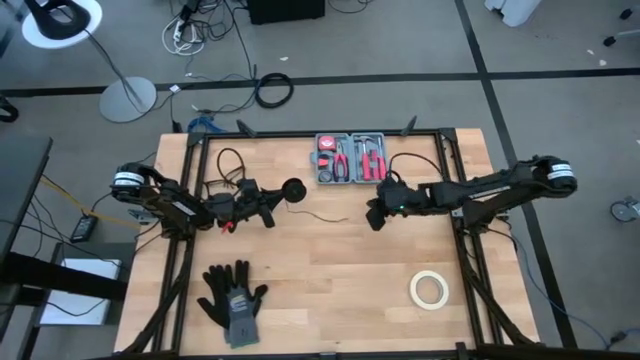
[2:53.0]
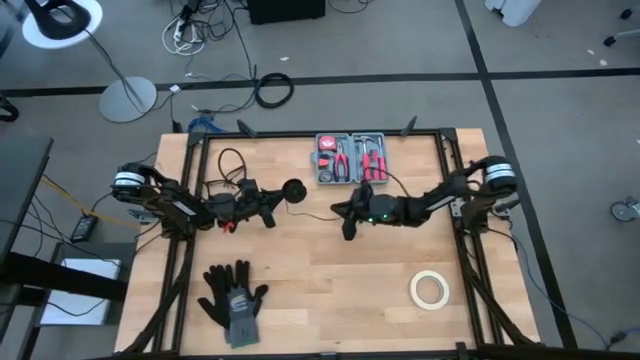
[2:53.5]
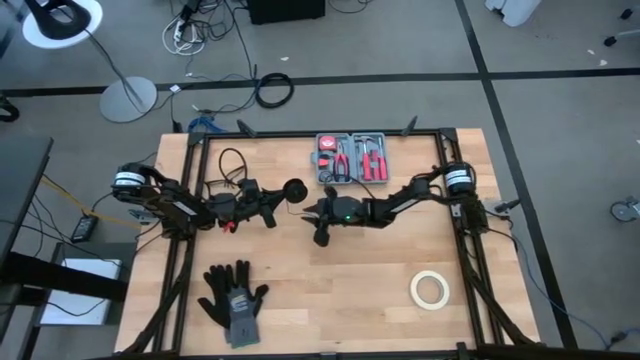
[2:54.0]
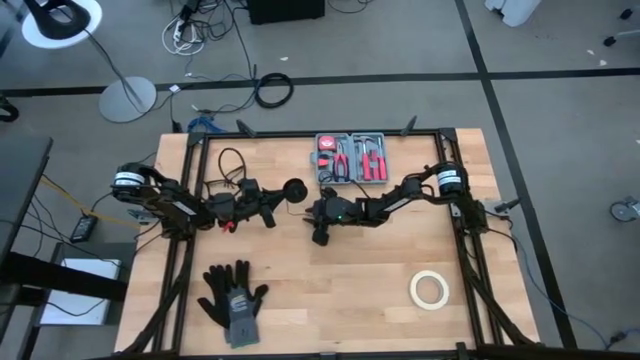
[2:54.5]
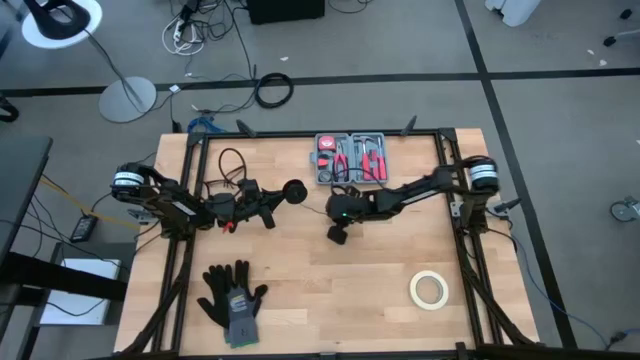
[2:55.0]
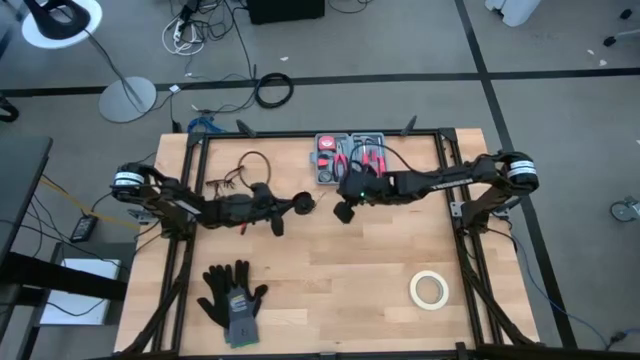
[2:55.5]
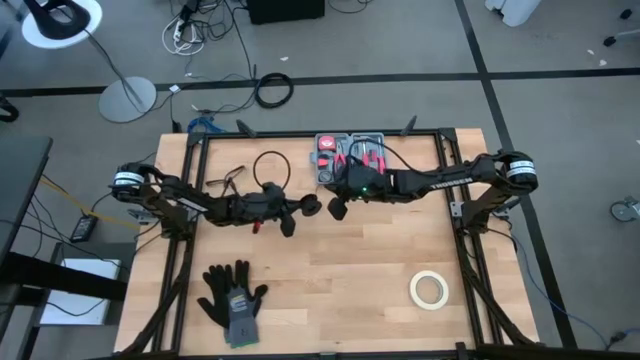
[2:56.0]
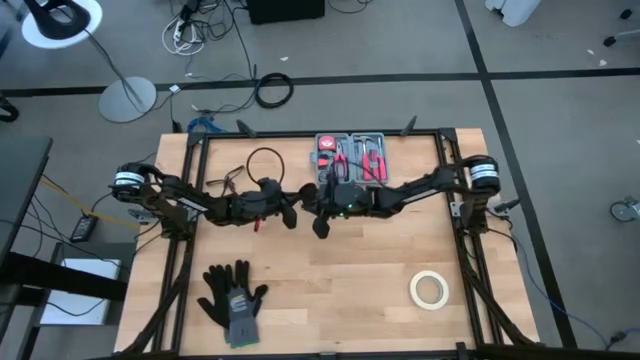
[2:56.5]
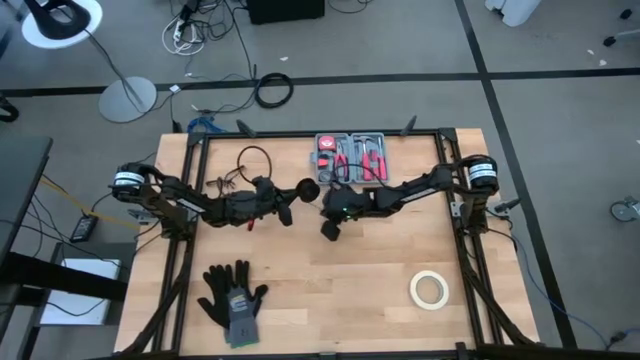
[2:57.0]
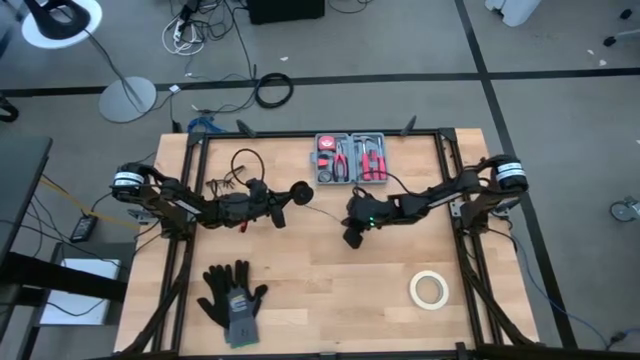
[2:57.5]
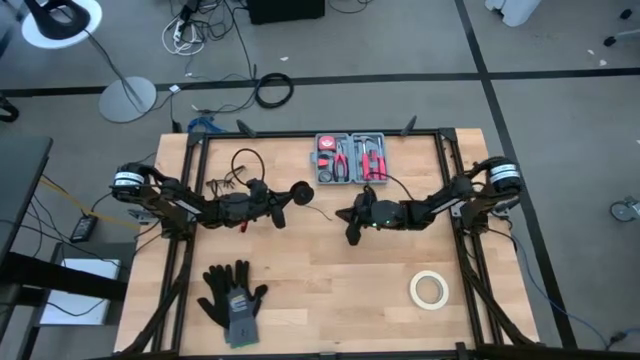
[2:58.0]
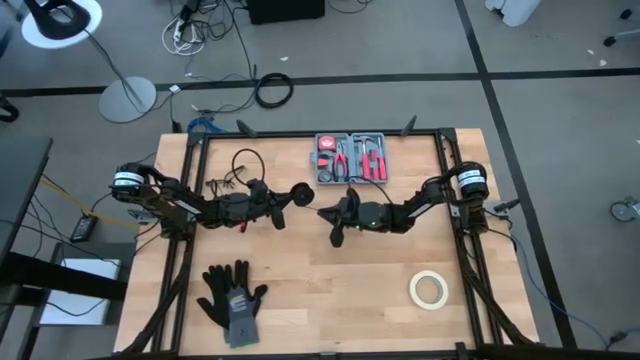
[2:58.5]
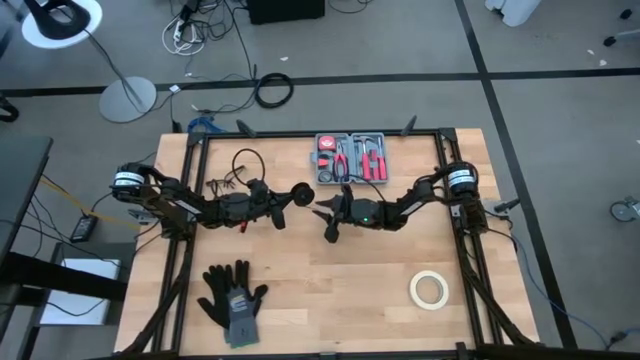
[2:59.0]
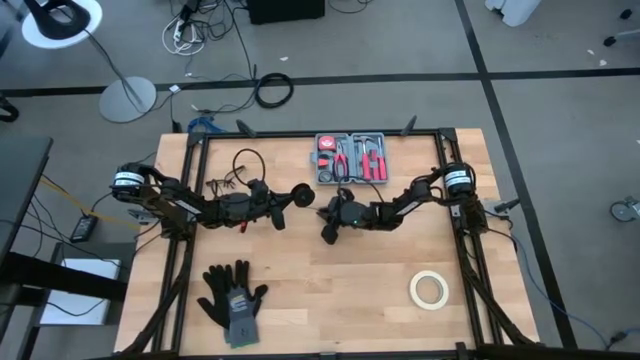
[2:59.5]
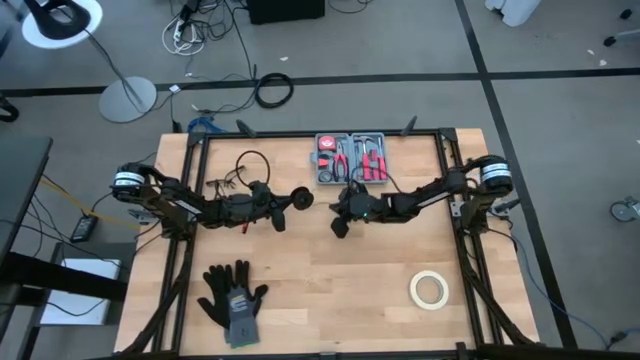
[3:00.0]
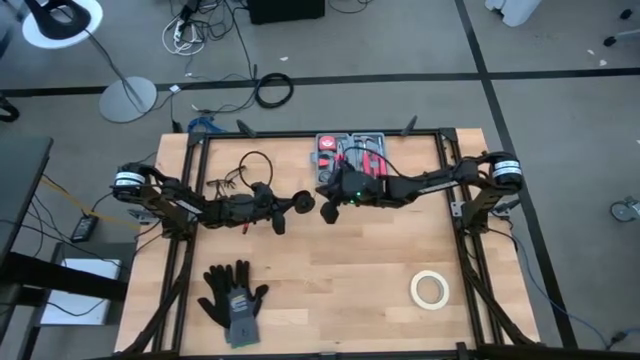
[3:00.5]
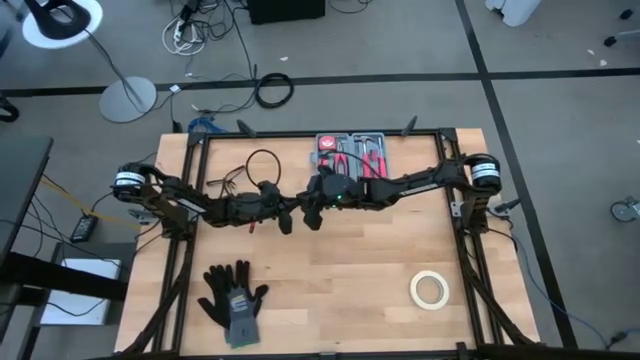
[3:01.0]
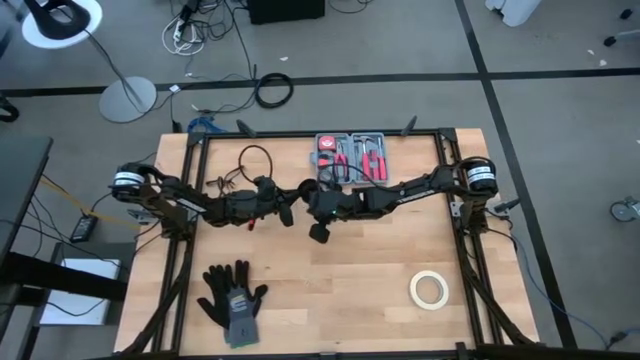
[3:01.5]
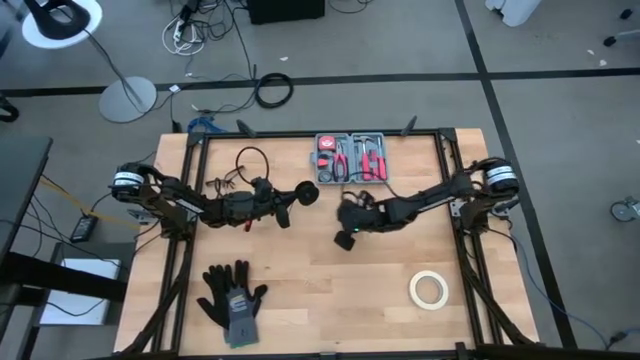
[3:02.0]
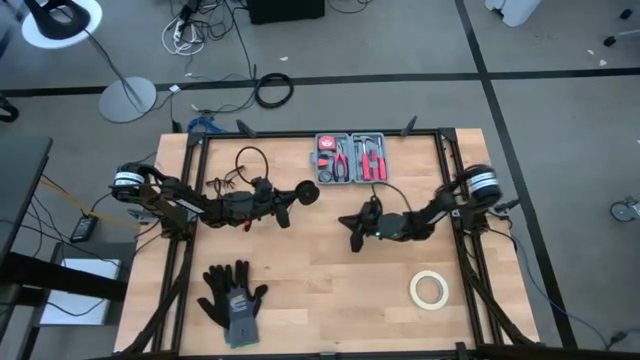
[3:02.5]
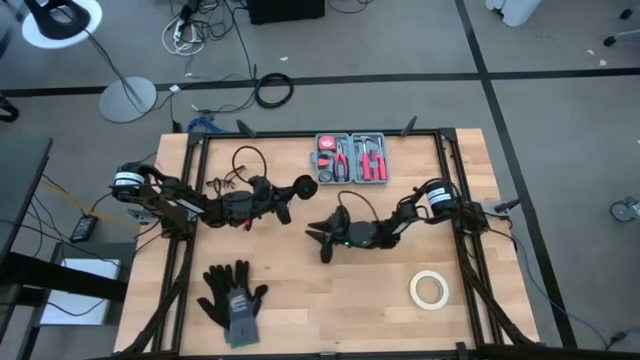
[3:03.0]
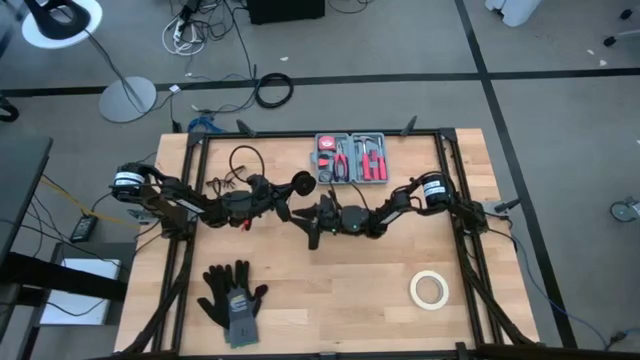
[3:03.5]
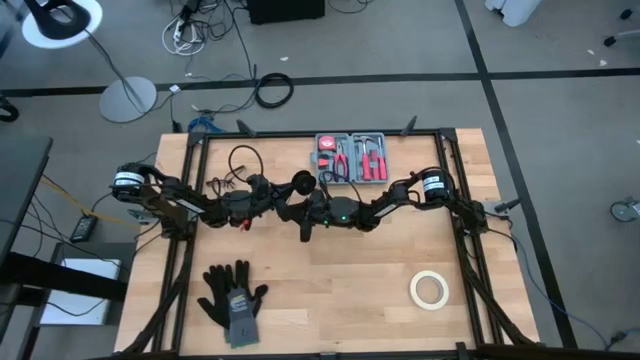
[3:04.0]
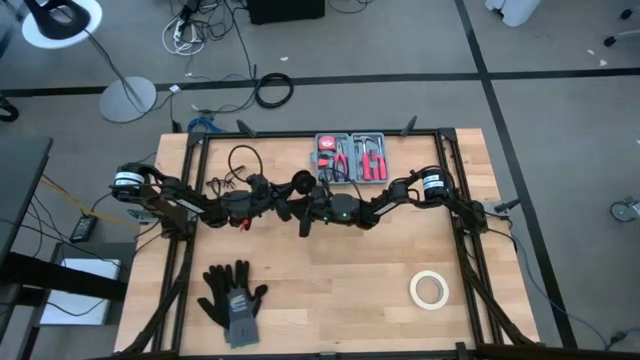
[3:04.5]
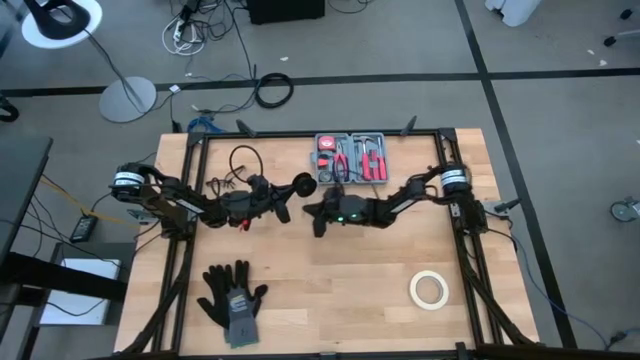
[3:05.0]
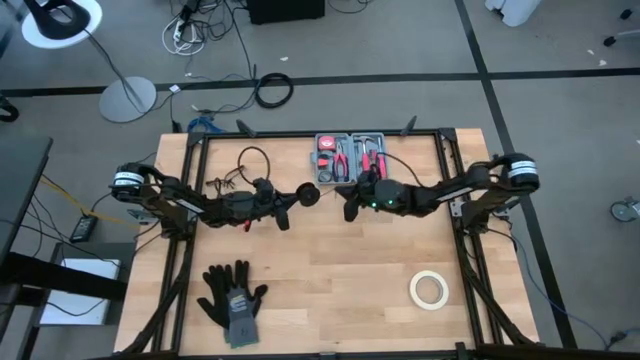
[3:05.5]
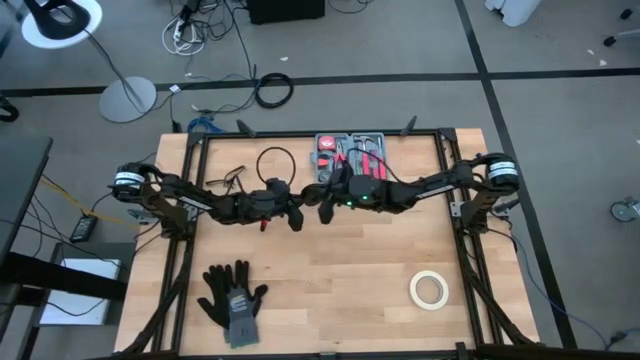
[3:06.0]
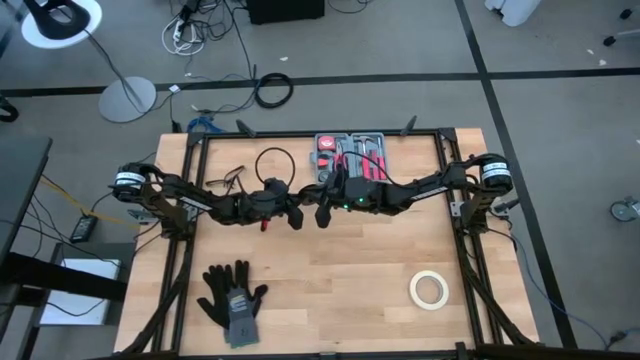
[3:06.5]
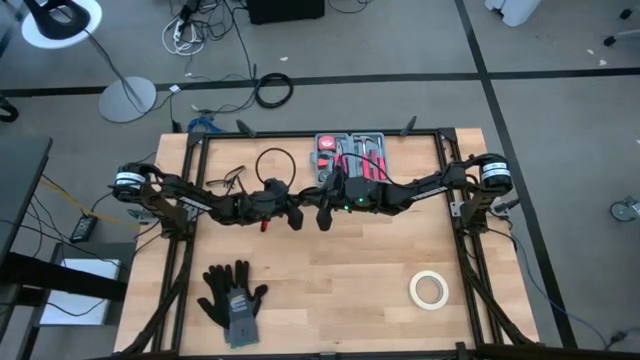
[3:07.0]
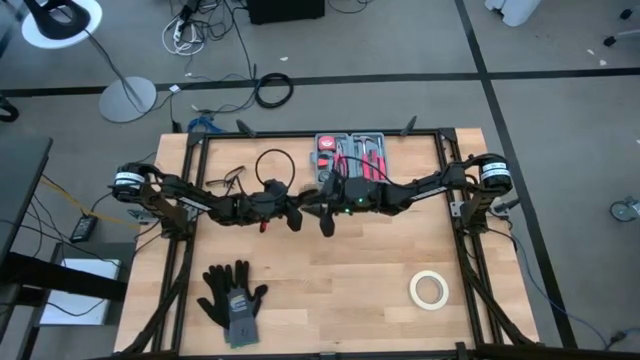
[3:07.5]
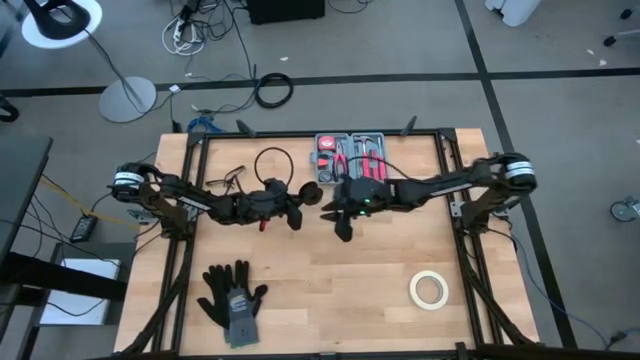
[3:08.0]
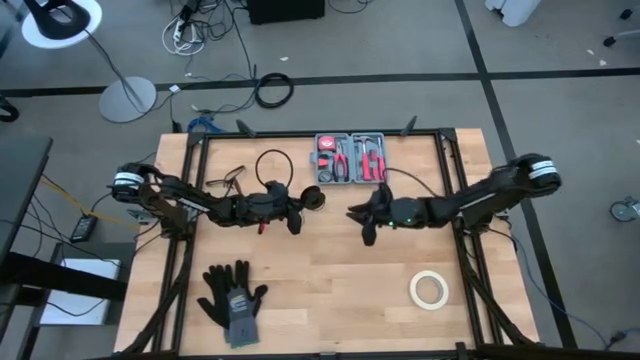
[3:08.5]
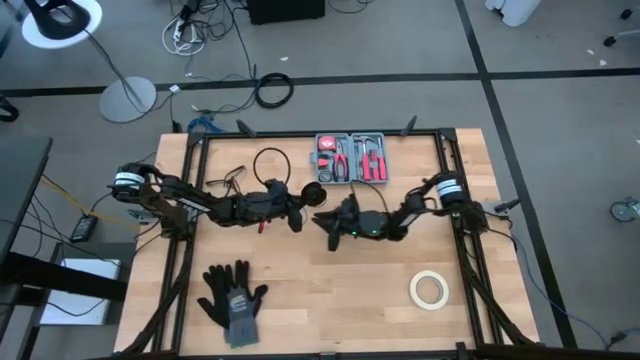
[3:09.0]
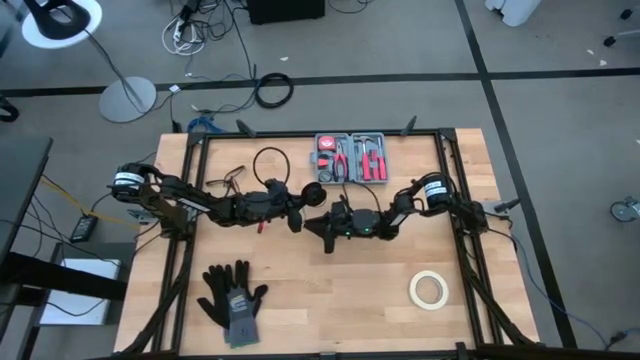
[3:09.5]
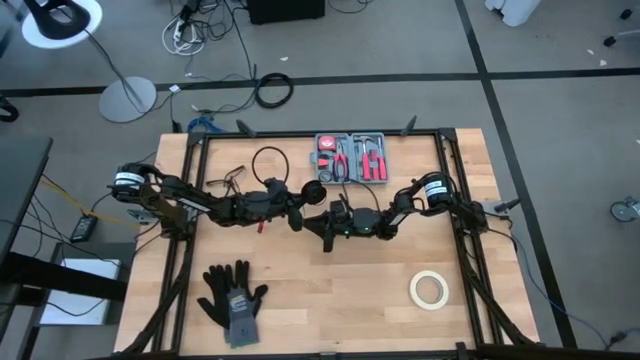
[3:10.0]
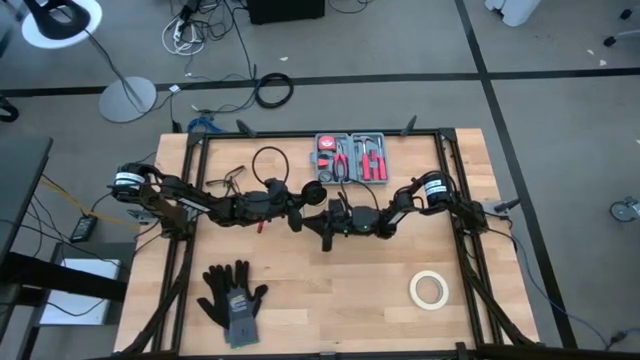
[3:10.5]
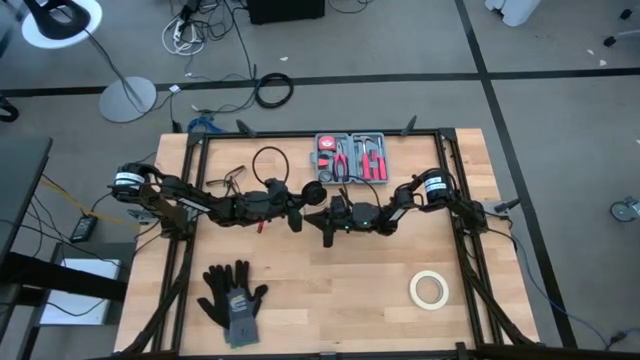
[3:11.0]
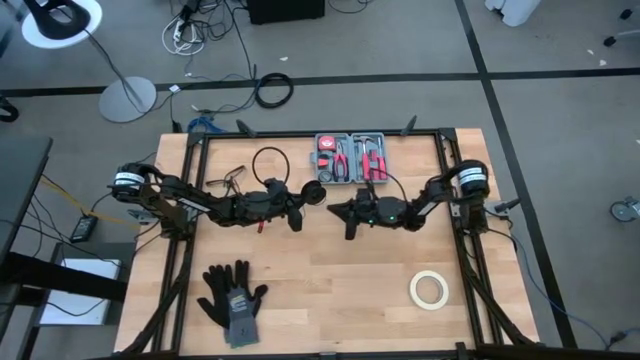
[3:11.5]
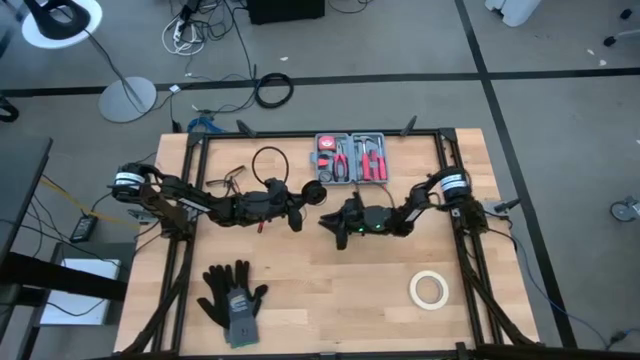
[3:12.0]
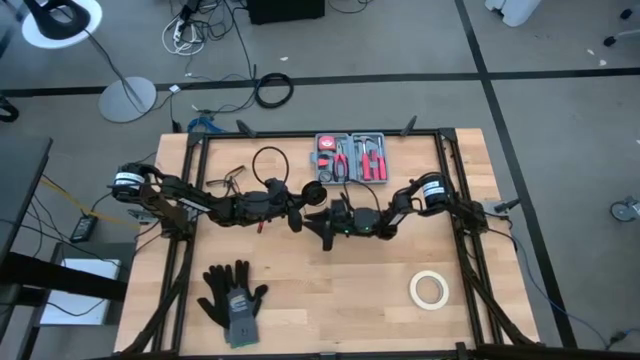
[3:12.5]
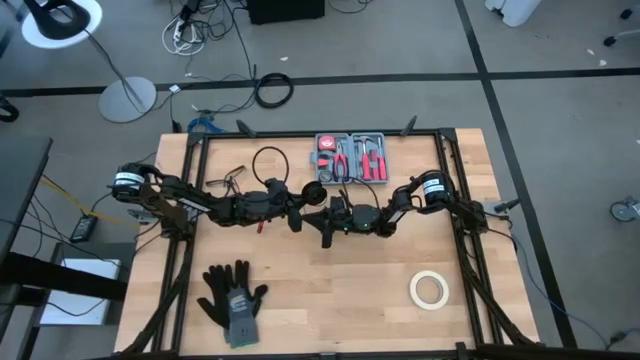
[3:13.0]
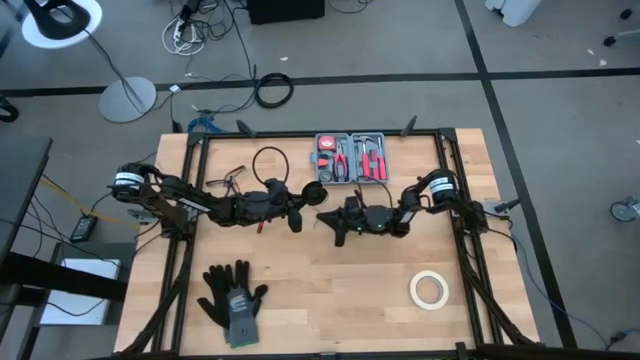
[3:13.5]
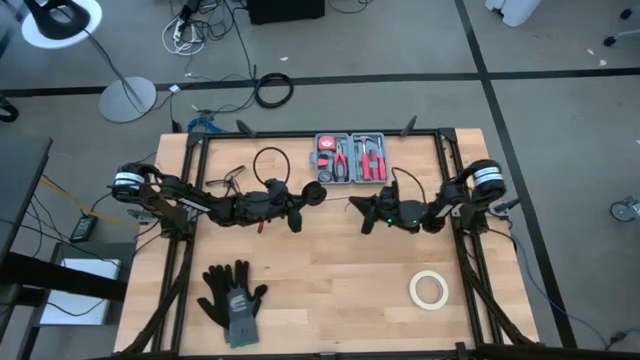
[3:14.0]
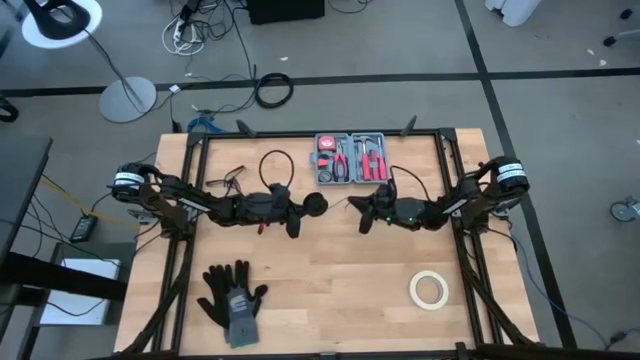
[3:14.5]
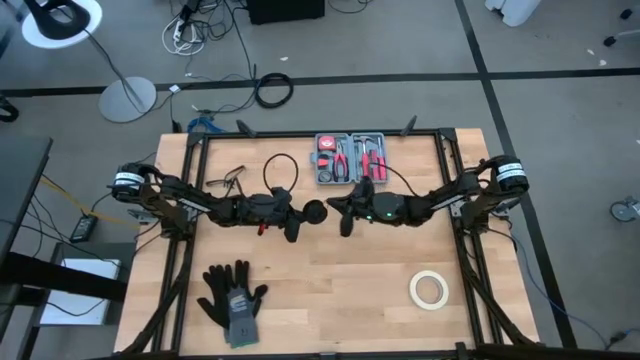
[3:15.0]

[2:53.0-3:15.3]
Task: Coil cords
Coil the black wire onto the black spool
